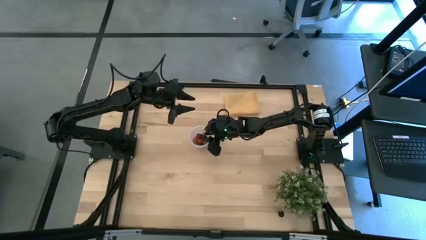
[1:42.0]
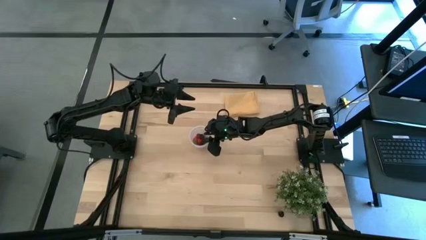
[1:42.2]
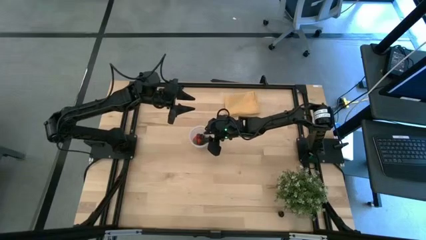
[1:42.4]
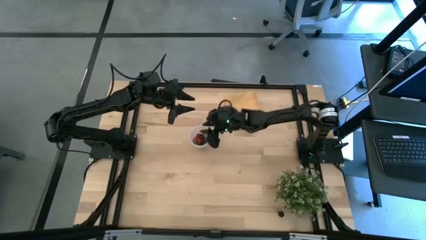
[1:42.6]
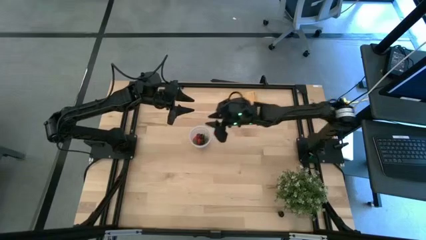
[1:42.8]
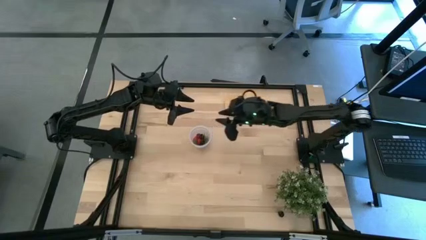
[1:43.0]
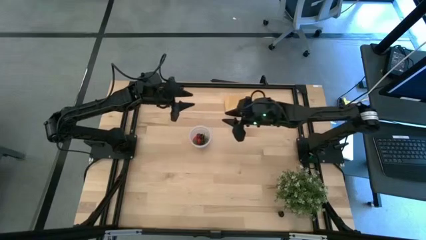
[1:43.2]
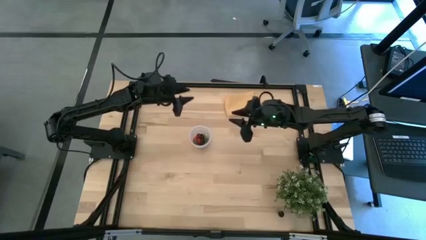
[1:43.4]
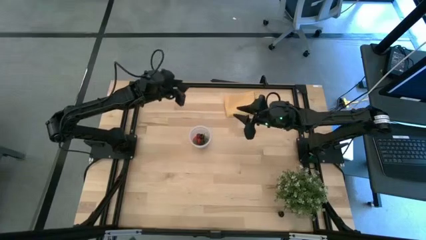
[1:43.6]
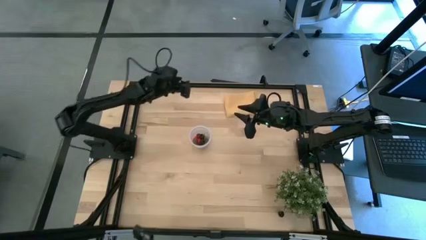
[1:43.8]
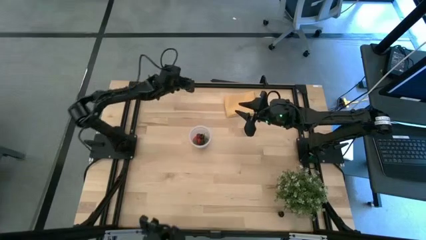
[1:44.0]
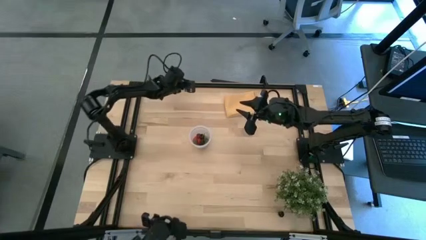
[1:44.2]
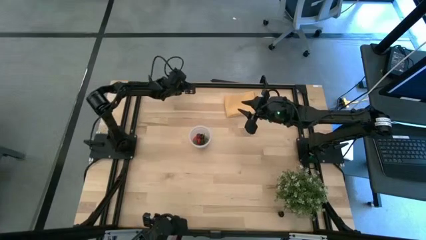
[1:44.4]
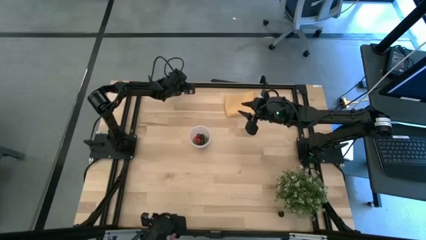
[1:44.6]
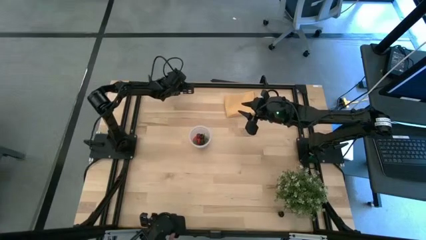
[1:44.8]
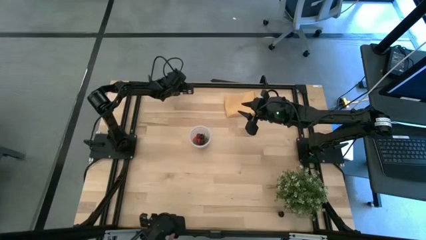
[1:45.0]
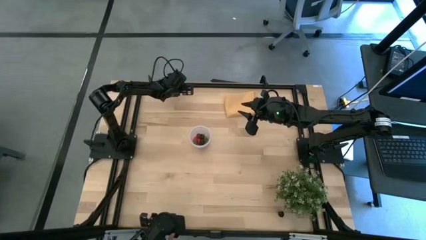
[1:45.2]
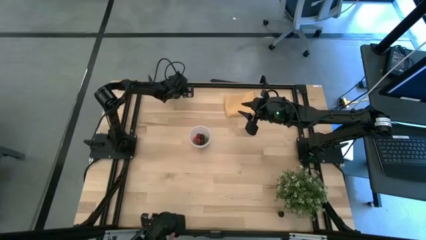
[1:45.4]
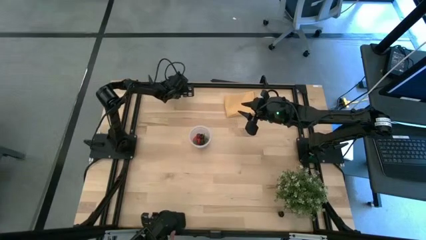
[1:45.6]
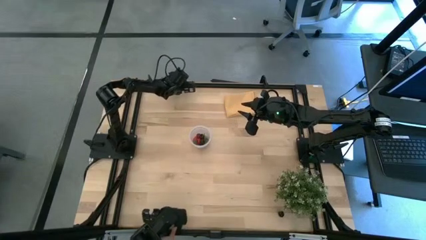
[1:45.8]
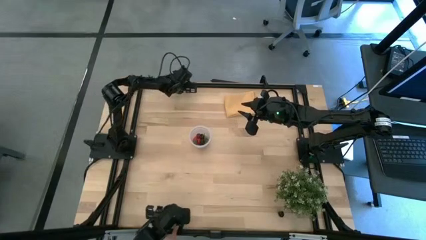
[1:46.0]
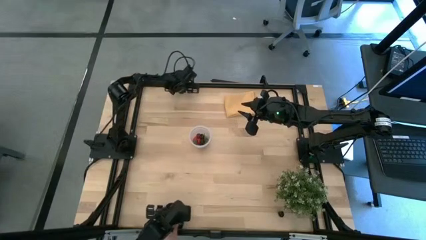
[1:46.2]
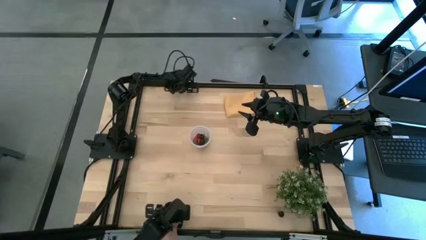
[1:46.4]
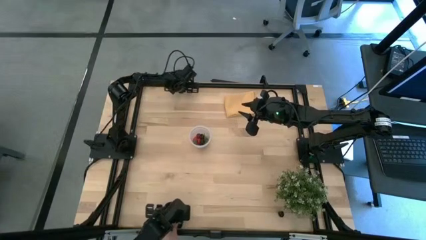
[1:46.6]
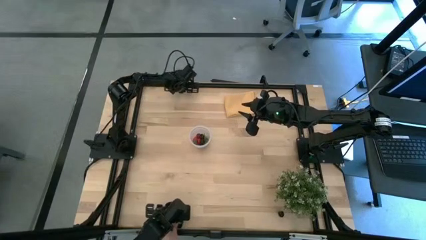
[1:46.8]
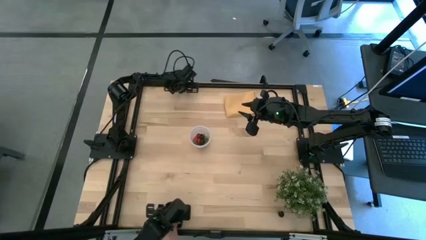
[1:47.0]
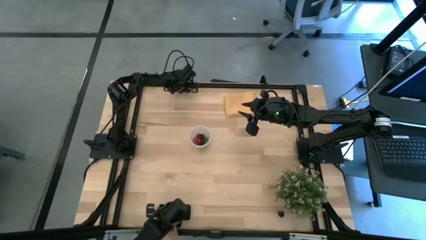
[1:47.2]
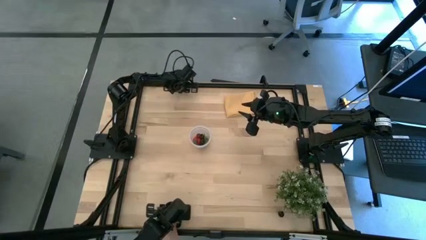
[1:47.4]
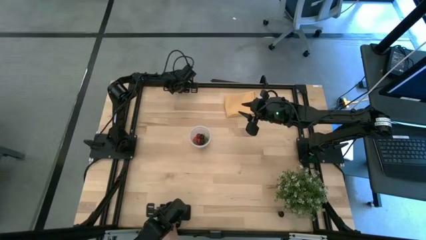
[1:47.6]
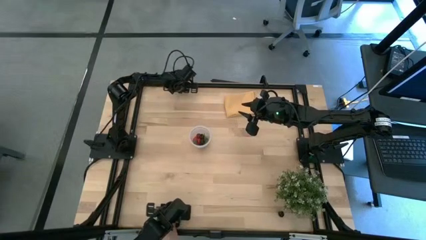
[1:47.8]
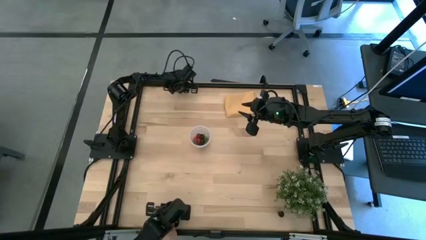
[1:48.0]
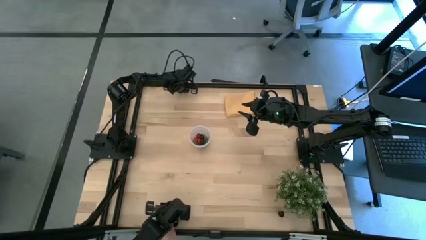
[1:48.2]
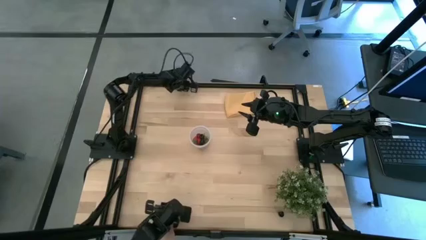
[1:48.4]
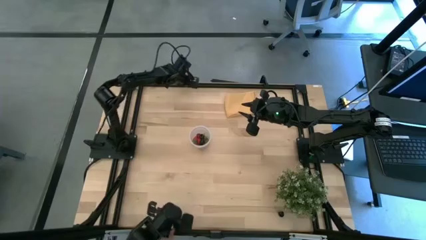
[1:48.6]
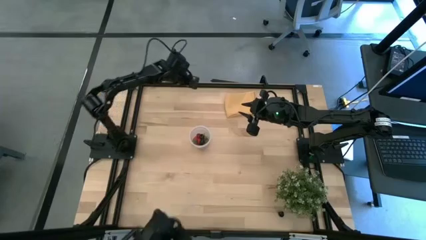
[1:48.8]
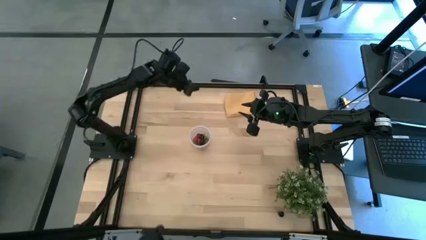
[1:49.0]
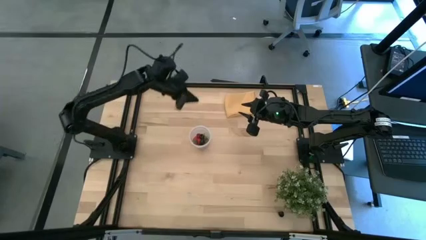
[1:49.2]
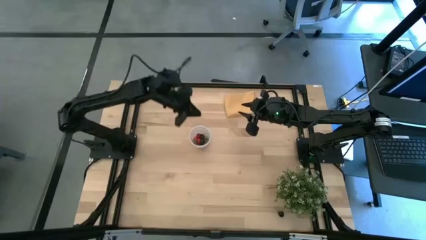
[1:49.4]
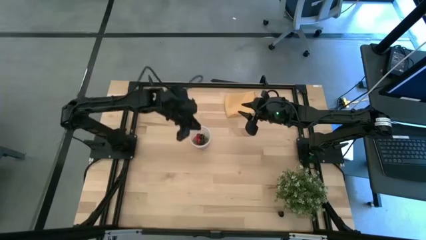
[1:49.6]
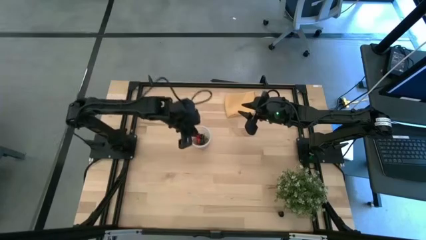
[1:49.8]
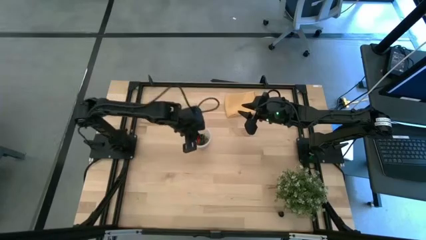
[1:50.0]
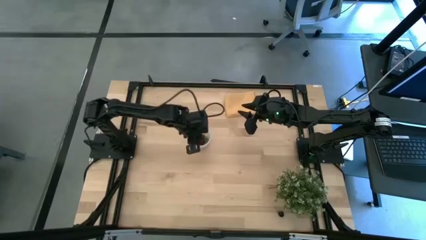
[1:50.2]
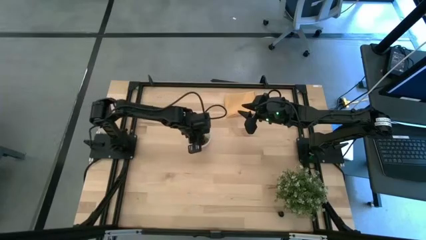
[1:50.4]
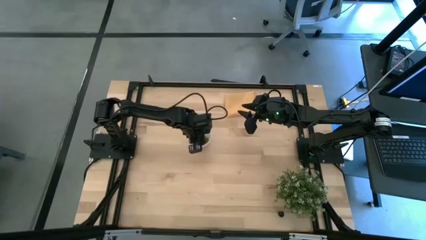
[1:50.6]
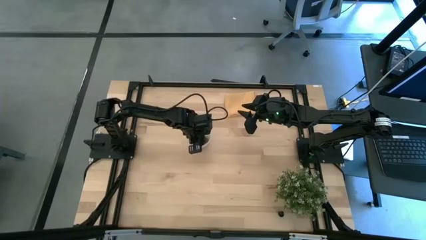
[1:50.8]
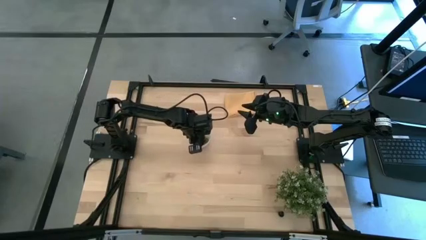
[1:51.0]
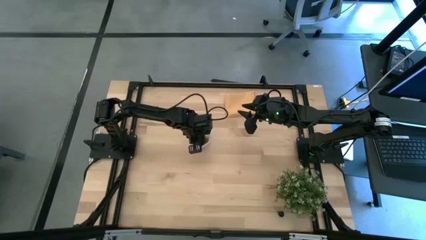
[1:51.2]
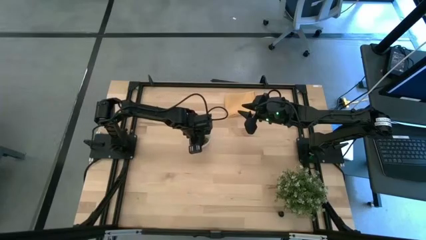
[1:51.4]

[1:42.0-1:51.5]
Task: Pick and placing Produce into tupperware
Put the blueberry into the transparent container

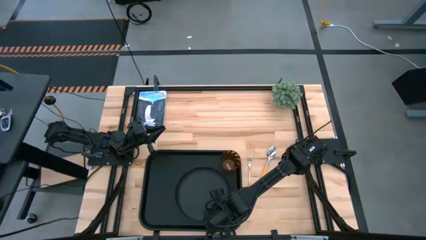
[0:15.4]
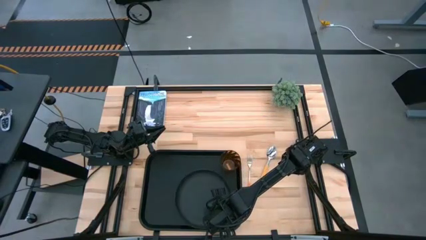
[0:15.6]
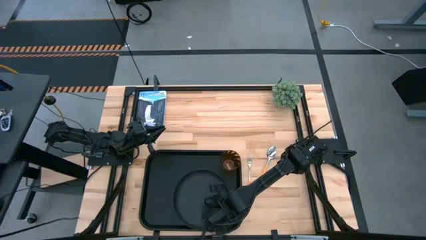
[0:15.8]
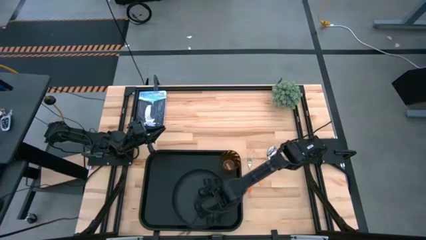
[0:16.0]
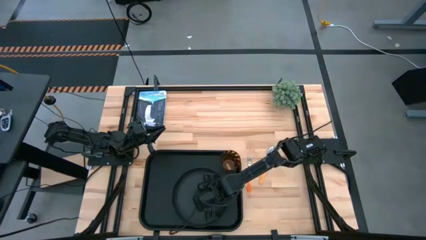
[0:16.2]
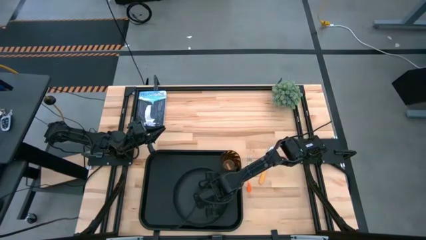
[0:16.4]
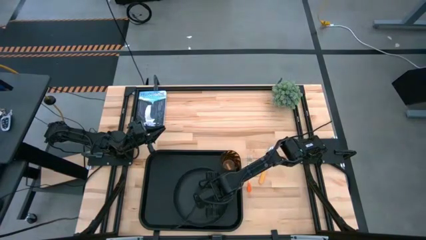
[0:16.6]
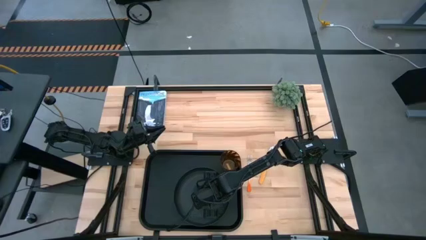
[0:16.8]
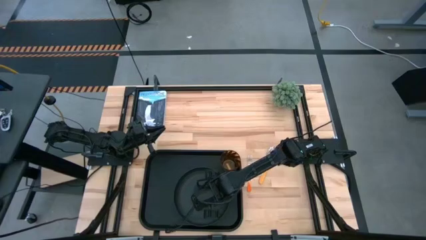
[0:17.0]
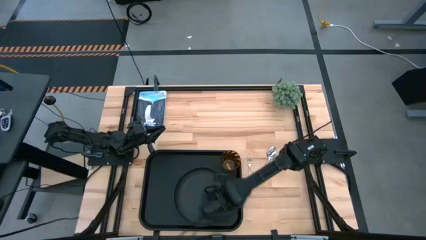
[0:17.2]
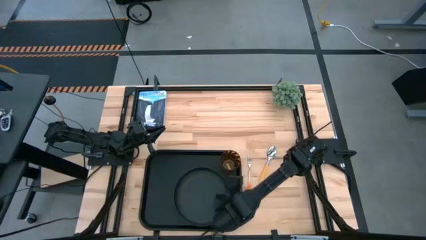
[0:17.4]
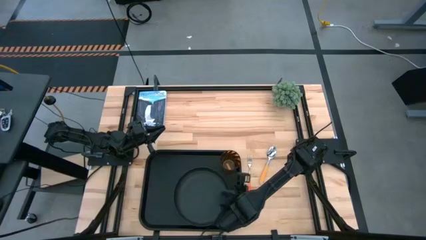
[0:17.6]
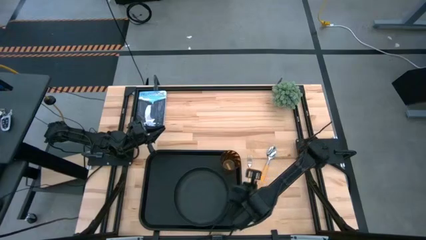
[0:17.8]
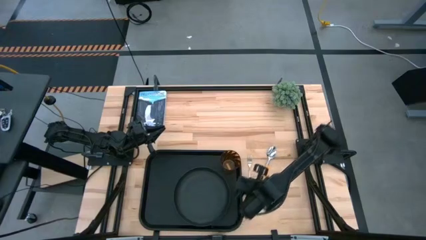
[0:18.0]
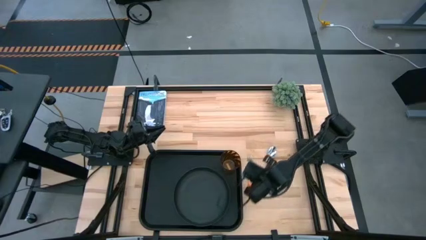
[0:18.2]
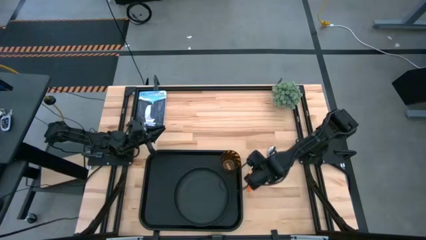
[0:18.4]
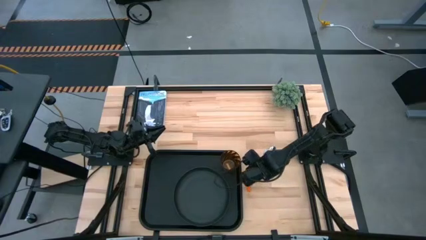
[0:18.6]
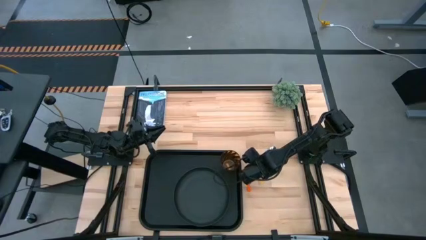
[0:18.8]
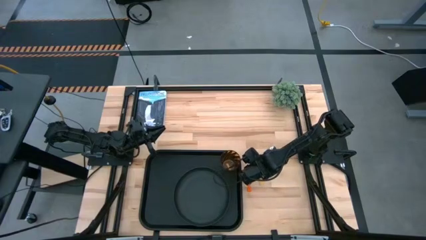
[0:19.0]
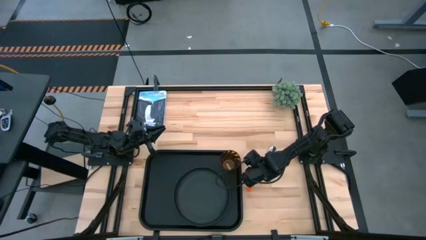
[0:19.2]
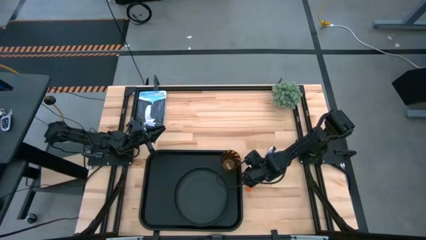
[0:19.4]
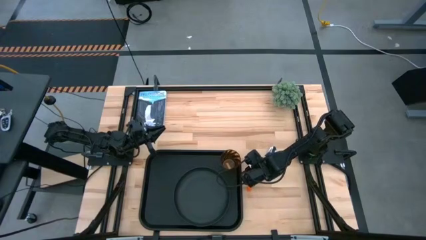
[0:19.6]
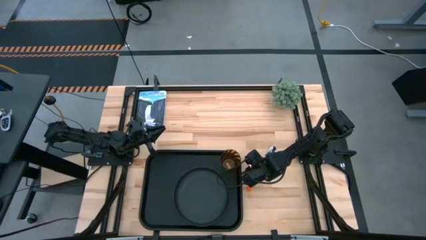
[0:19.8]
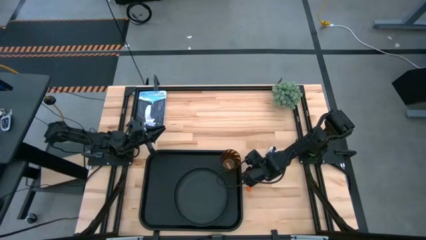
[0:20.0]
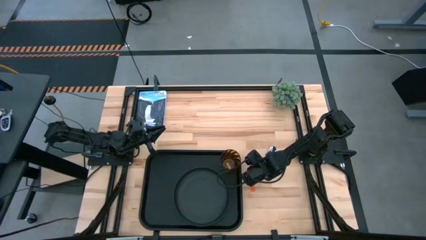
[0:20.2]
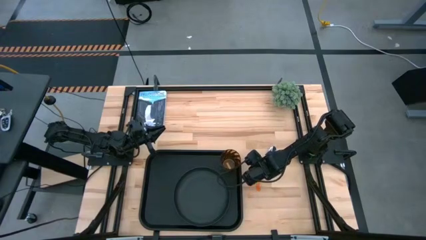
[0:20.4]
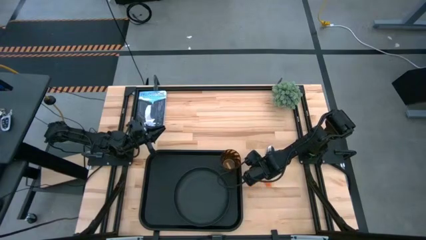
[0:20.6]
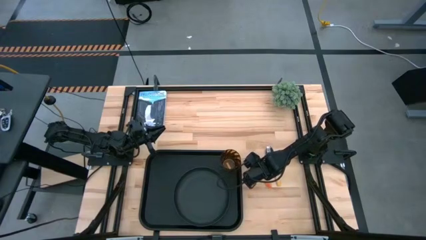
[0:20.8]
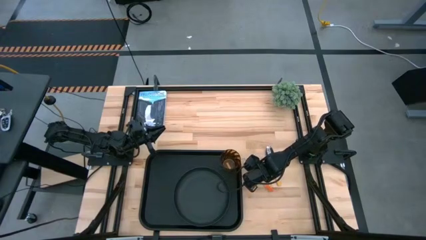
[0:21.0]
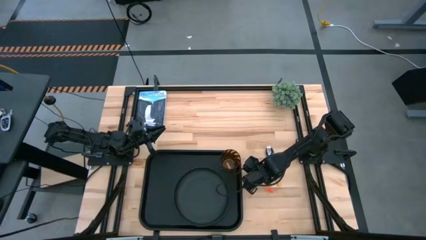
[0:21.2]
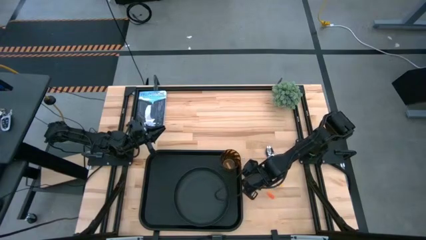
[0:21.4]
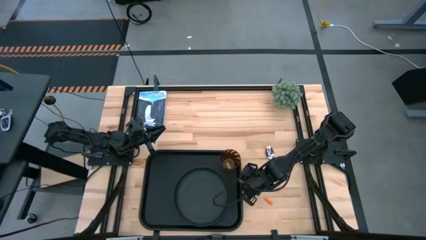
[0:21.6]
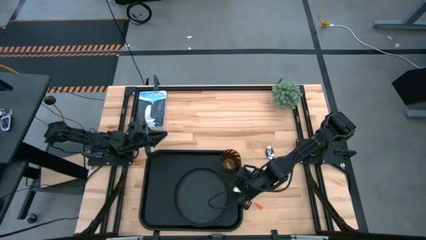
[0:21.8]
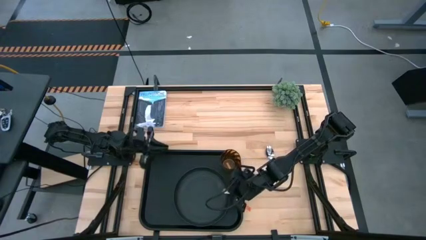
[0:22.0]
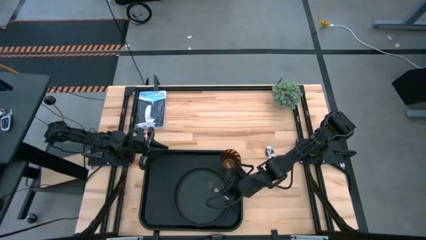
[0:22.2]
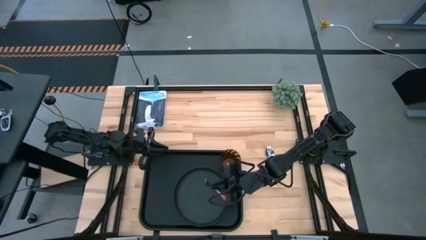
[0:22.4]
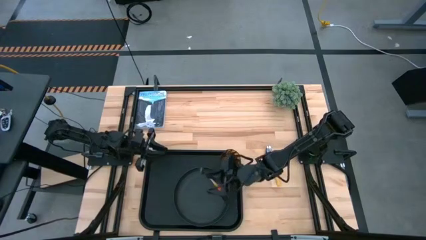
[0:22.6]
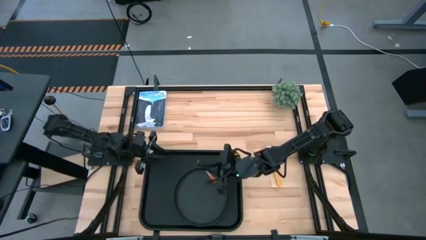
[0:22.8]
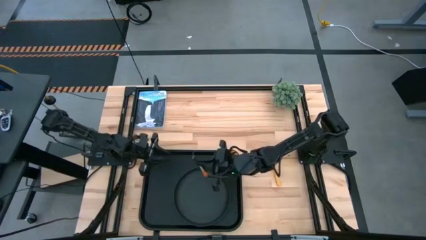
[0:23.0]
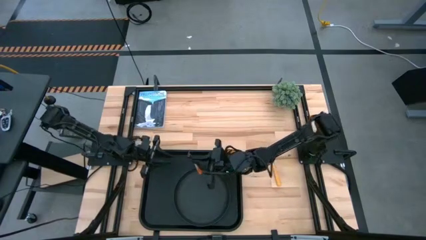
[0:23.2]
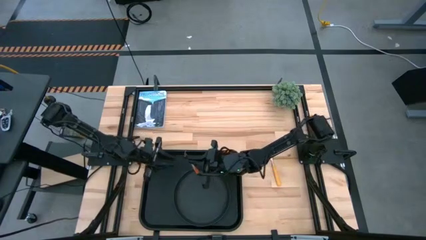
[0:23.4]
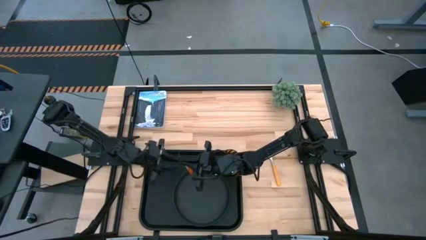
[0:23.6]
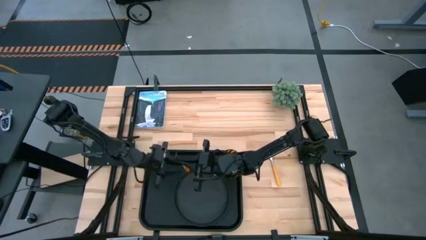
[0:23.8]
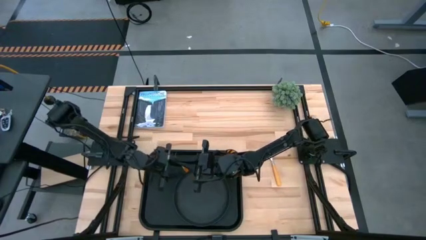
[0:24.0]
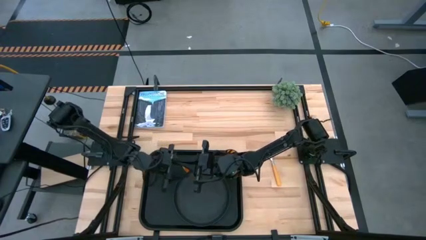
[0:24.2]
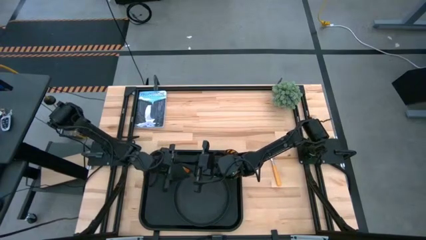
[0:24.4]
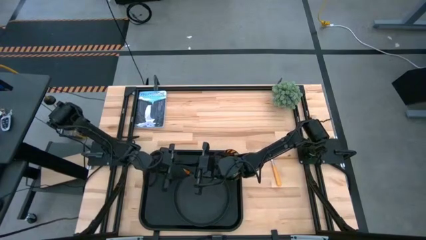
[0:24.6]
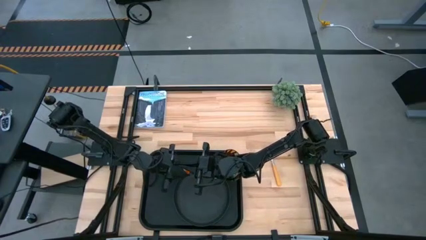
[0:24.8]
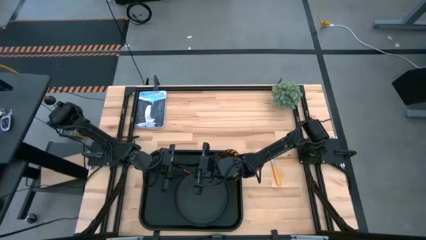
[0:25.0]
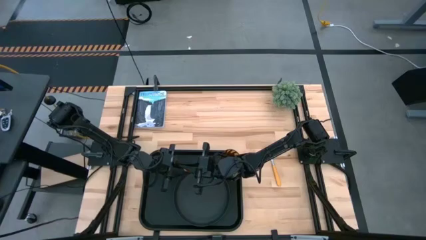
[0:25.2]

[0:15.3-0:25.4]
Task: Pick and place plate/cup/fork/spoon on tray
Put the orange fork to the left of the black plate on the black serving tray
